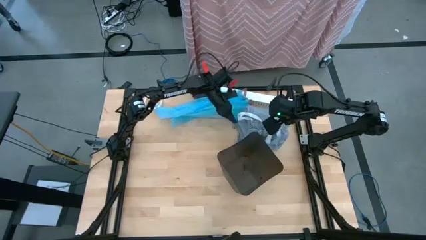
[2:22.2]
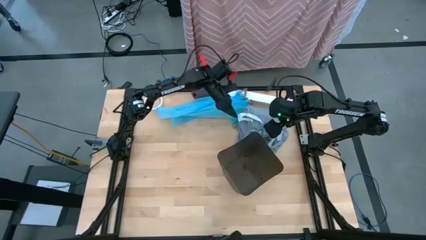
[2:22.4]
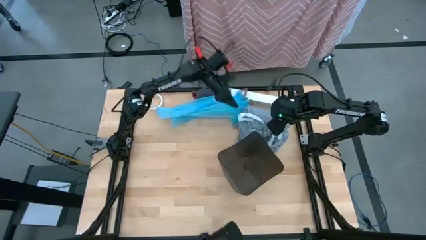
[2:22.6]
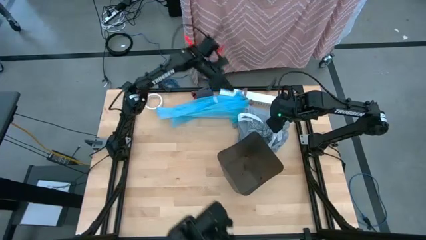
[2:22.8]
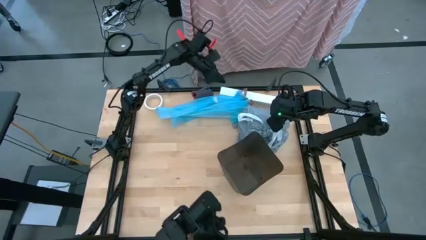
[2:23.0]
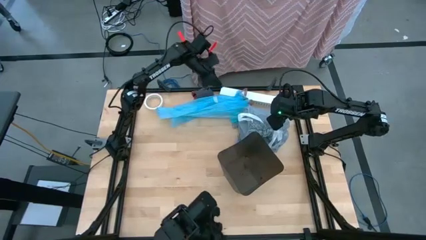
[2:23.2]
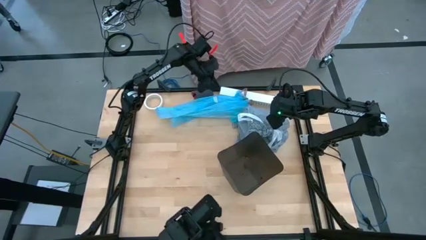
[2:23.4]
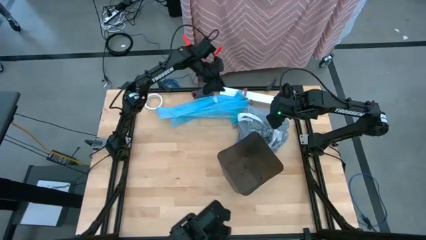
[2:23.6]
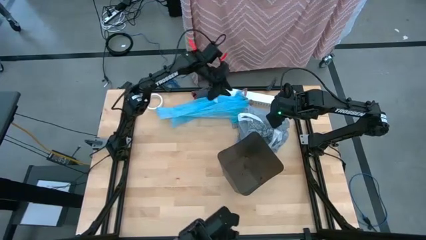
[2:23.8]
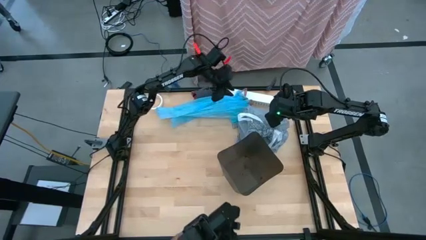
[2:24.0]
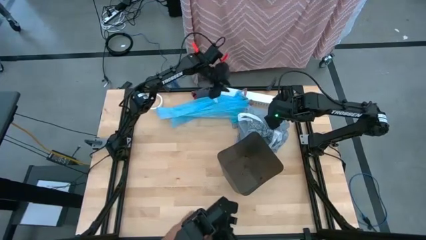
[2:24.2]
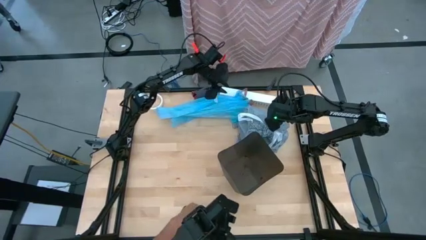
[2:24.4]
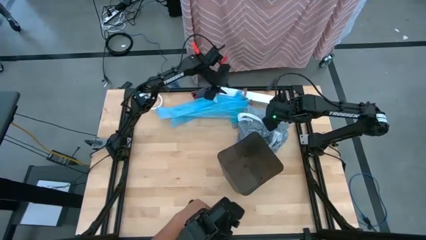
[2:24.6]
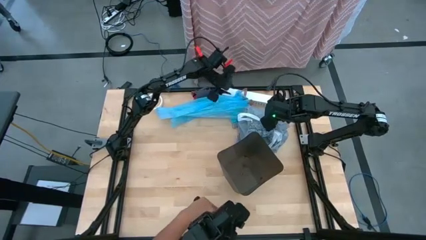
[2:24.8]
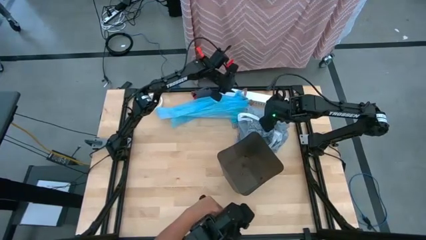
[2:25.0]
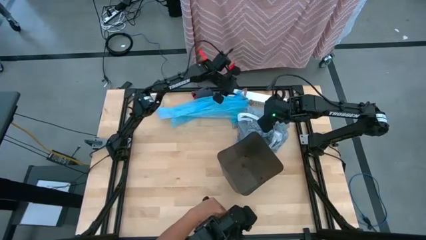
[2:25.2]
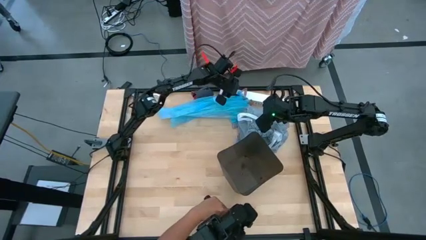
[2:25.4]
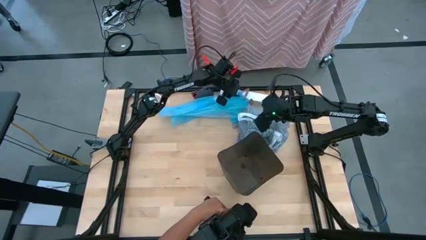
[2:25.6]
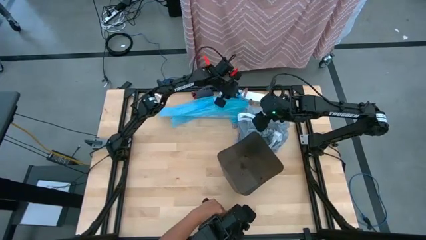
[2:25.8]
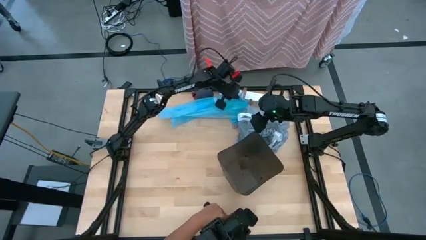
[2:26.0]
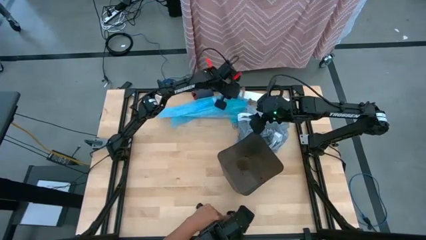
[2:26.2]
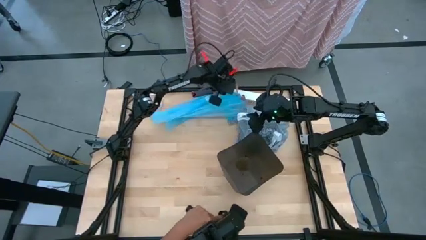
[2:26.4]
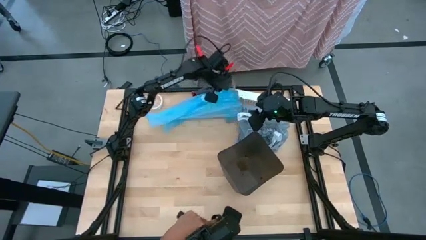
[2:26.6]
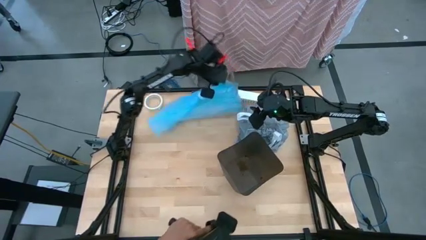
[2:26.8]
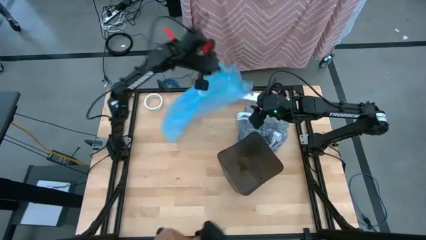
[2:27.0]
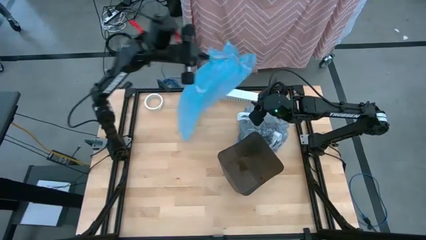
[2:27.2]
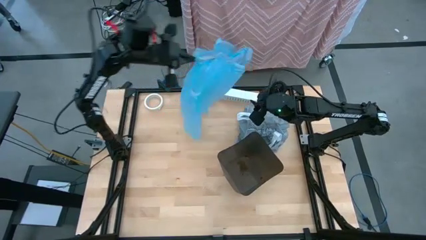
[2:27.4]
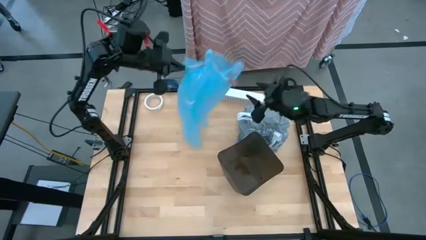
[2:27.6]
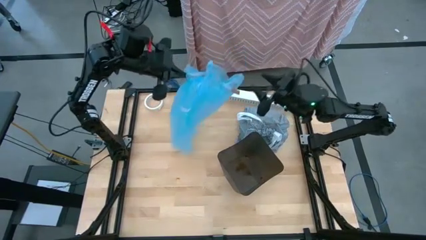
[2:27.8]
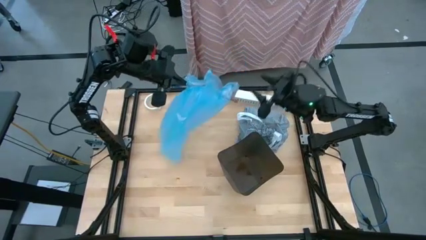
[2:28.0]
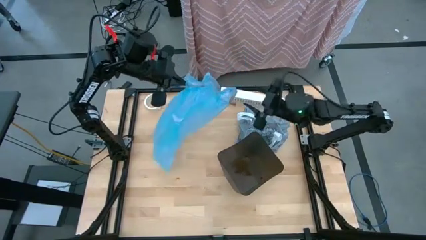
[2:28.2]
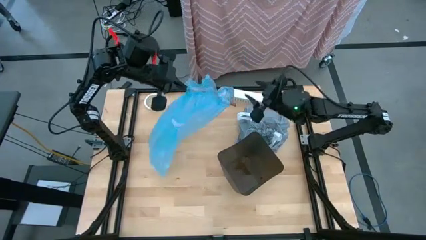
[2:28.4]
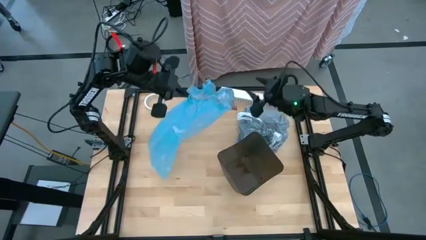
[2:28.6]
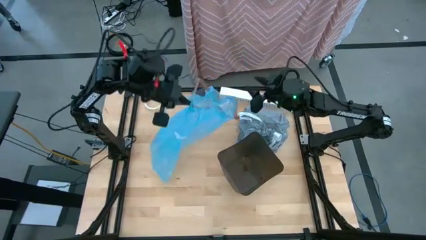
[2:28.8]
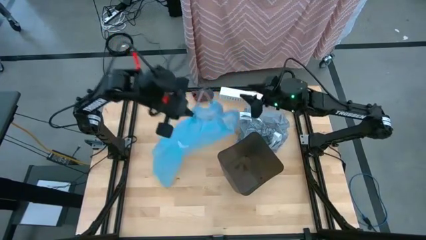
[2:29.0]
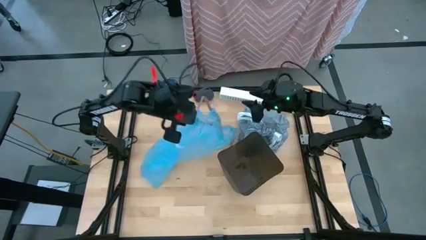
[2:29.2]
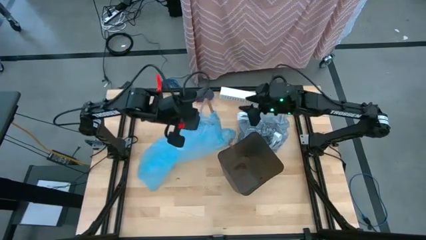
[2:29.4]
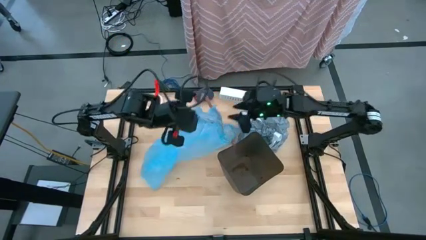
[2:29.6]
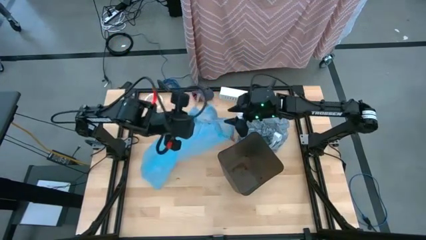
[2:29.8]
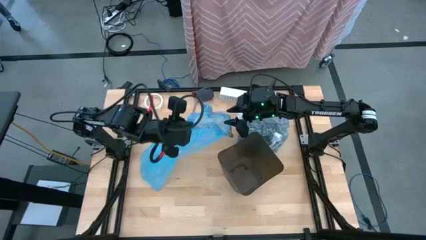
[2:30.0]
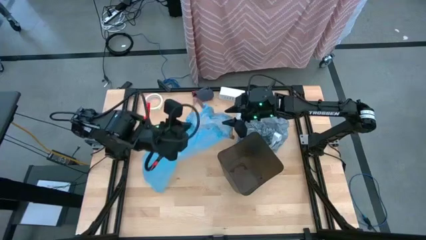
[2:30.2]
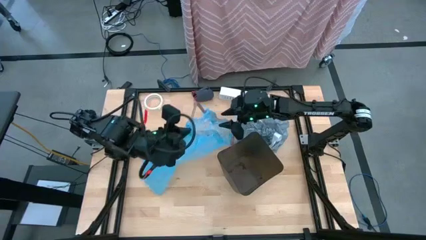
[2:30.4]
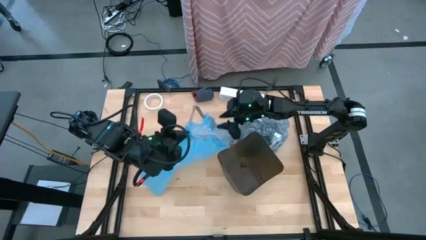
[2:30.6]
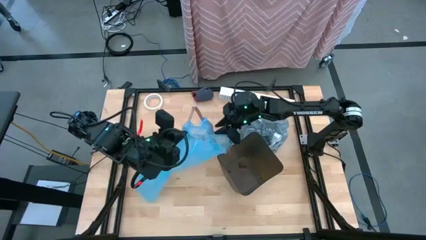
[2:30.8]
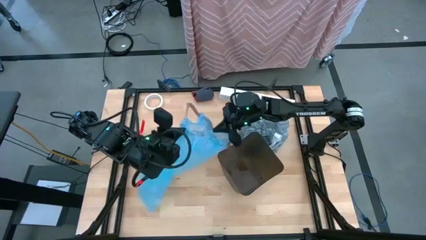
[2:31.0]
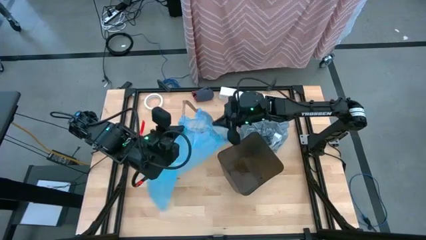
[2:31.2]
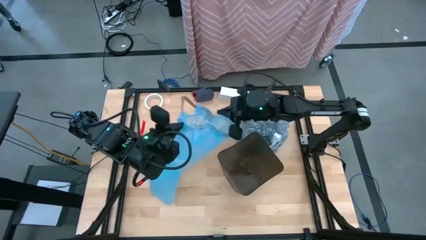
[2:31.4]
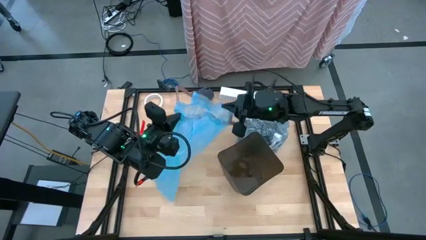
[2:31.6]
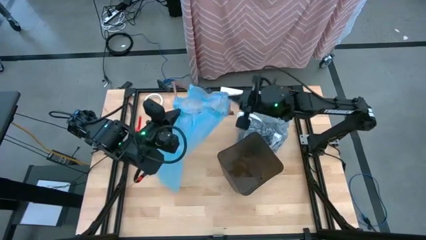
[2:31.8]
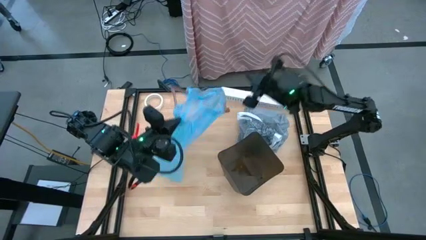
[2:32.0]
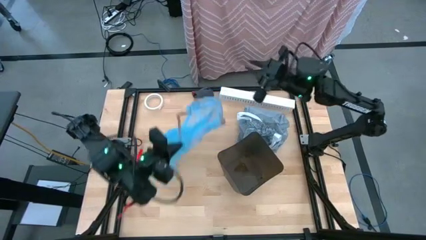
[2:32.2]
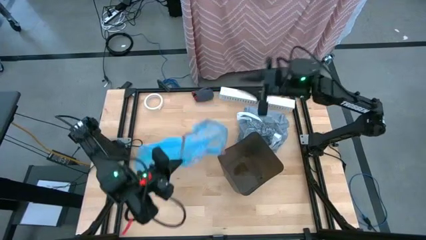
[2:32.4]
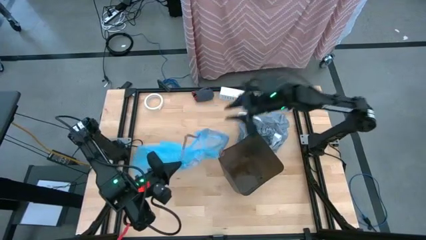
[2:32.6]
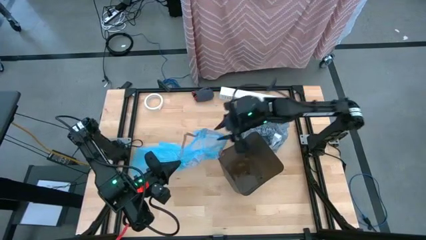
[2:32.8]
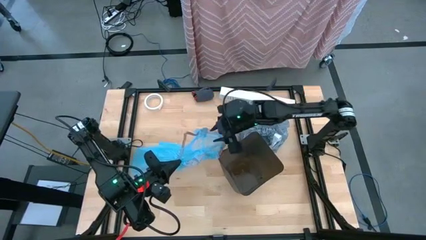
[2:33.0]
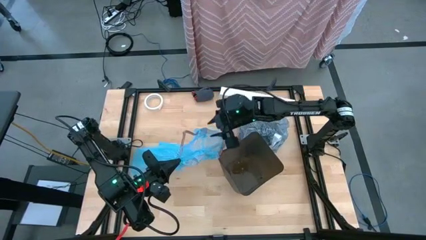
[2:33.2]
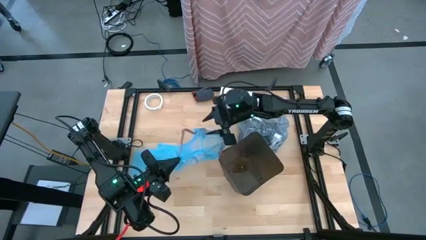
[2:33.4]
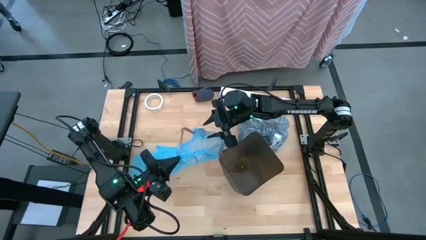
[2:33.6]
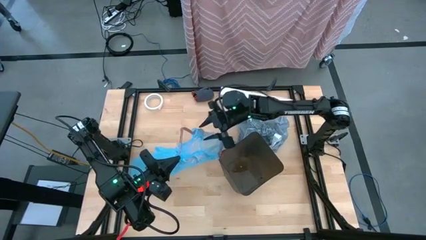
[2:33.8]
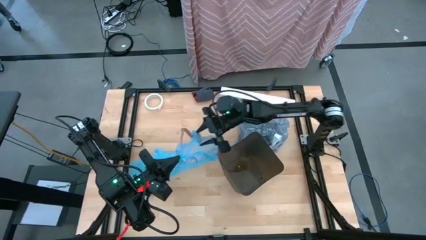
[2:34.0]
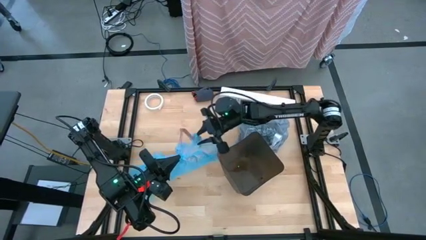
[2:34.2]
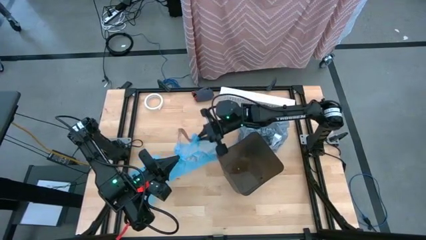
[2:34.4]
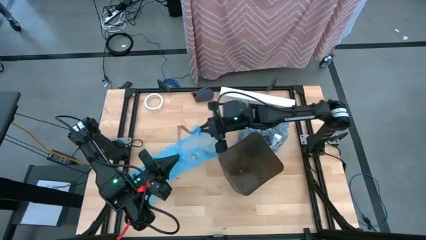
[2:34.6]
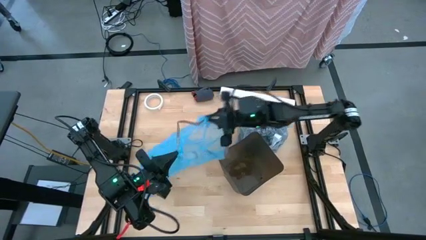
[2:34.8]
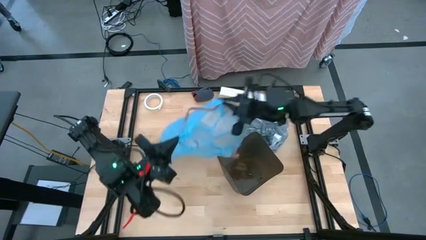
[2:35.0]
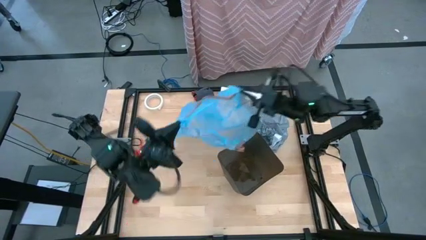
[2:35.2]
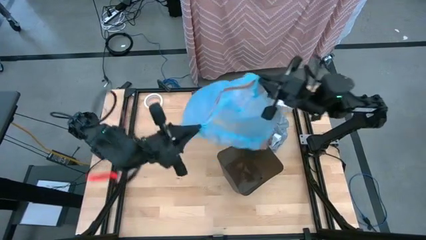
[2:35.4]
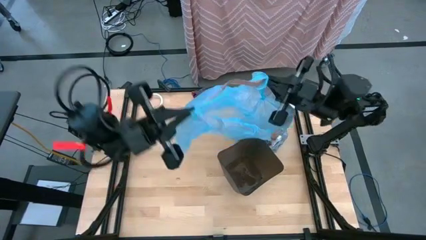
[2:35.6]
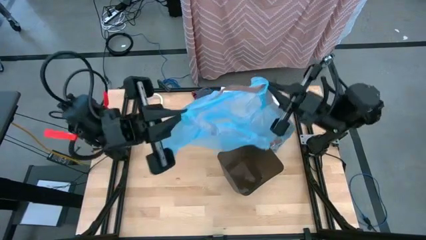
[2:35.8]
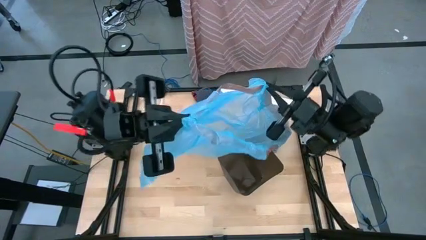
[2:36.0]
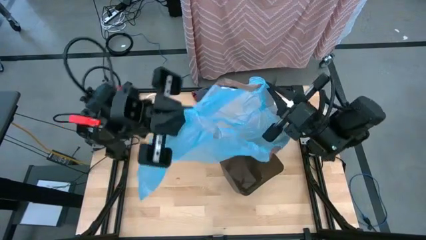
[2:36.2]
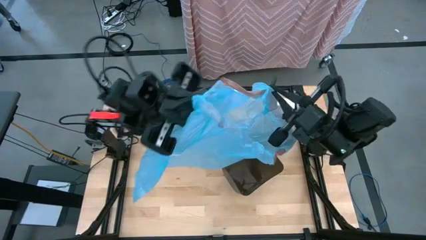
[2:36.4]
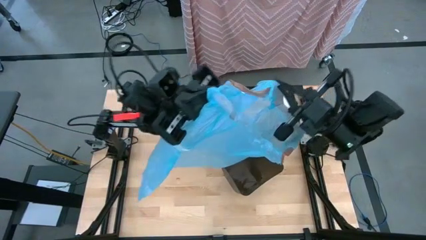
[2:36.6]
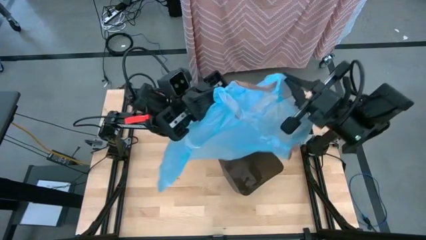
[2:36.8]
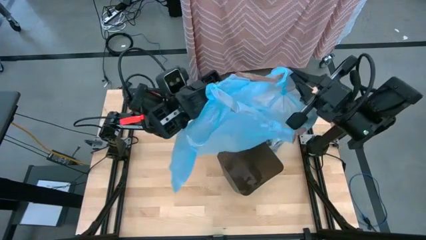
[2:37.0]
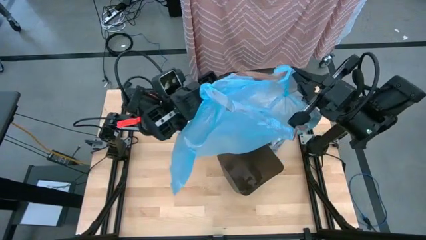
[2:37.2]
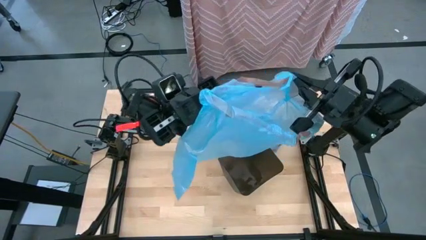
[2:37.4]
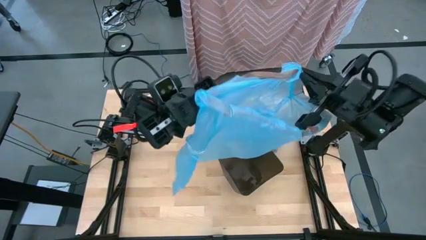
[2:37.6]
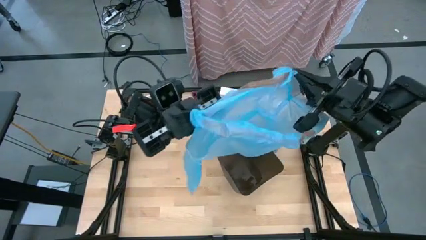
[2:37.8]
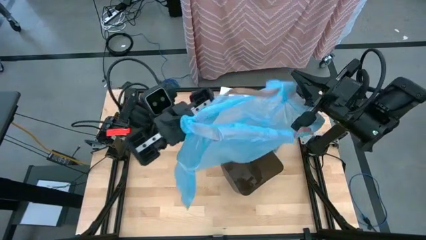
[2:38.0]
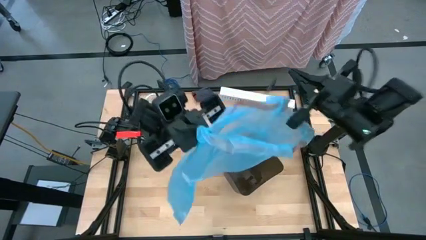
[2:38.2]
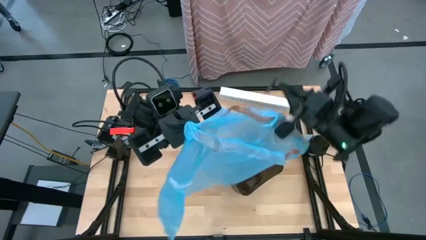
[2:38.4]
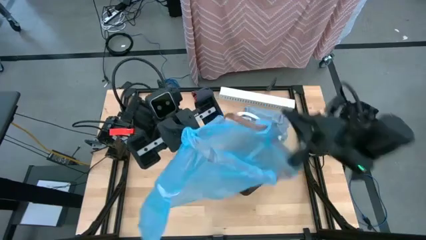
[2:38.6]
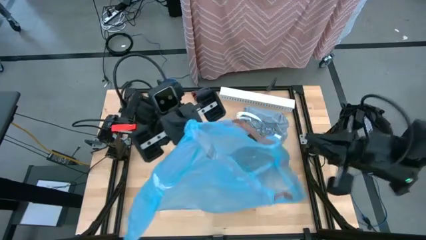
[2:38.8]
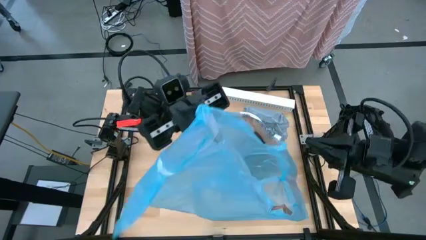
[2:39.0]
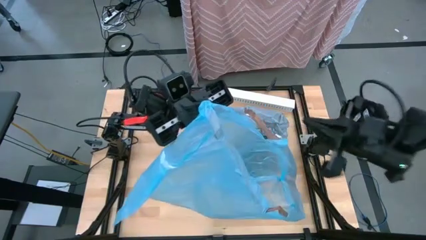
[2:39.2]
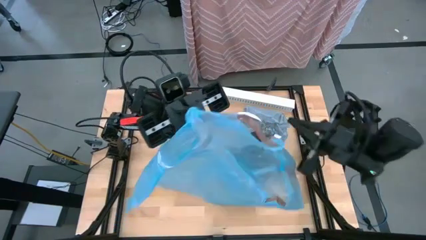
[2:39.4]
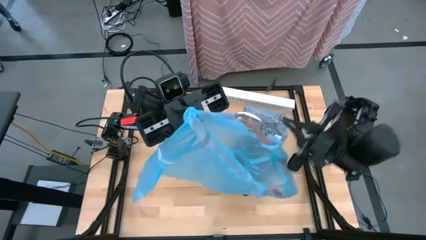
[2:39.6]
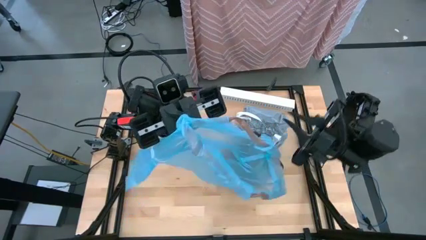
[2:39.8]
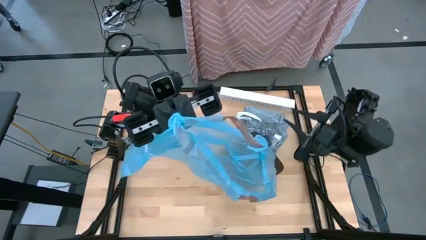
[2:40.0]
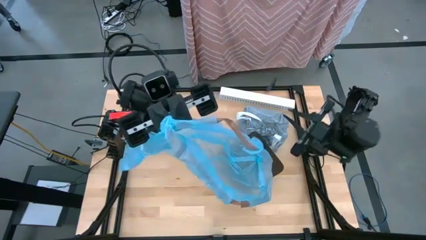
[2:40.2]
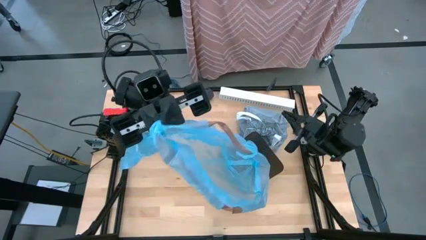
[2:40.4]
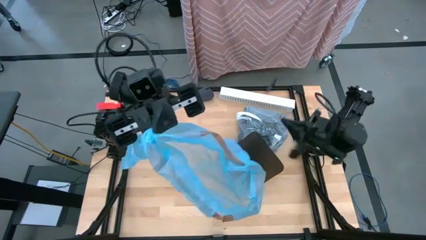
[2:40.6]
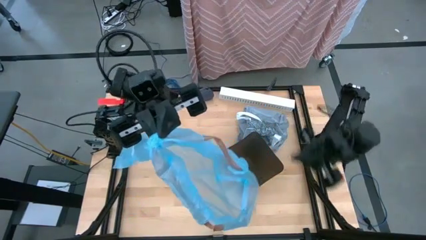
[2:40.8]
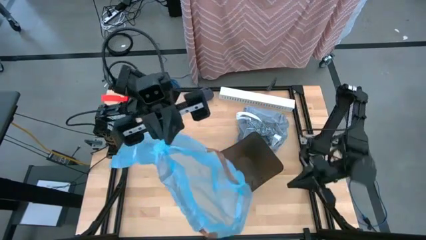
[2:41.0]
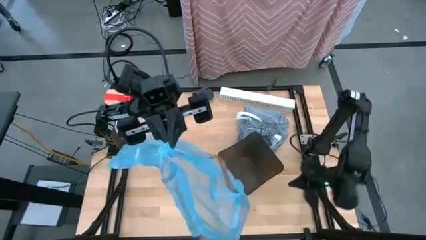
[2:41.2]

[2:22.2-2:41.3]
Task: place trash/remove bag and relplace
Insert the new blue trash bag into the black trash bin
